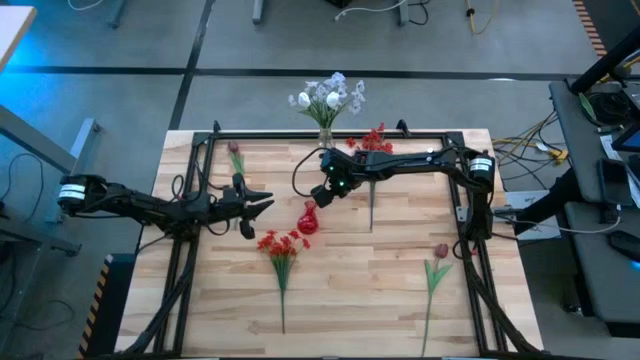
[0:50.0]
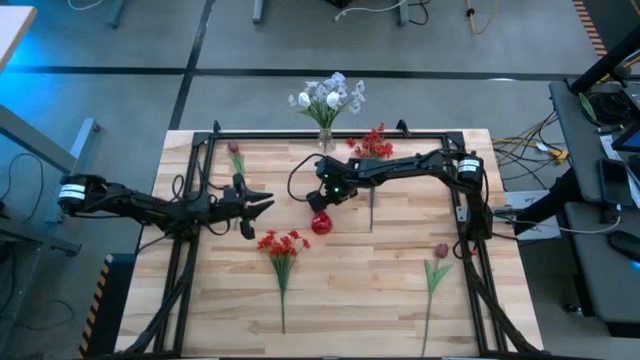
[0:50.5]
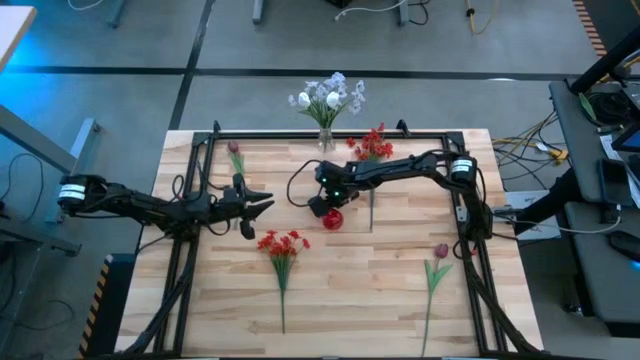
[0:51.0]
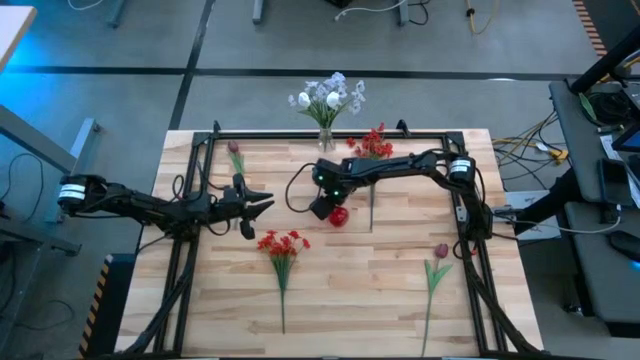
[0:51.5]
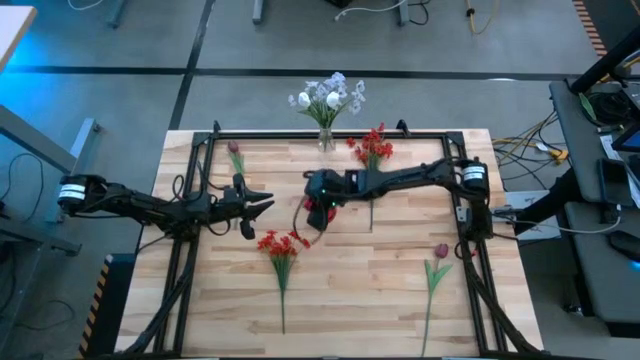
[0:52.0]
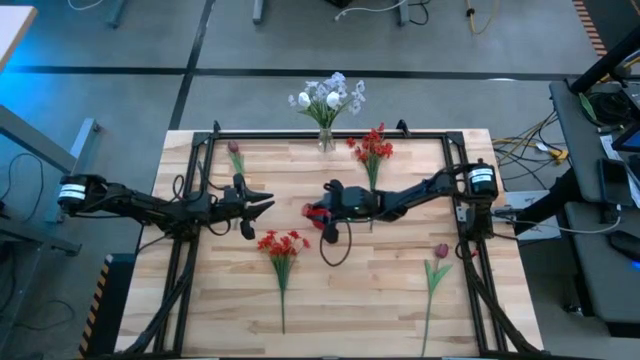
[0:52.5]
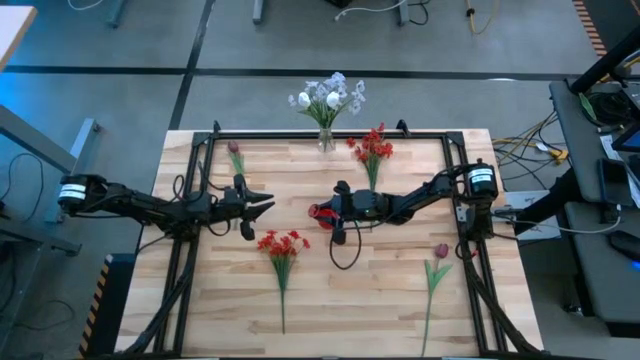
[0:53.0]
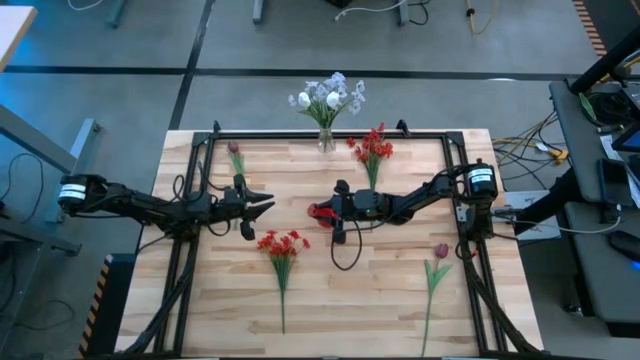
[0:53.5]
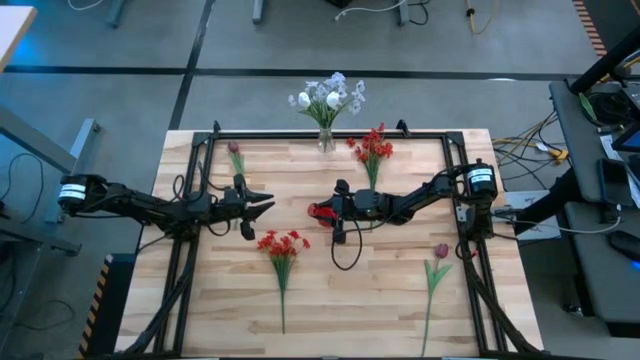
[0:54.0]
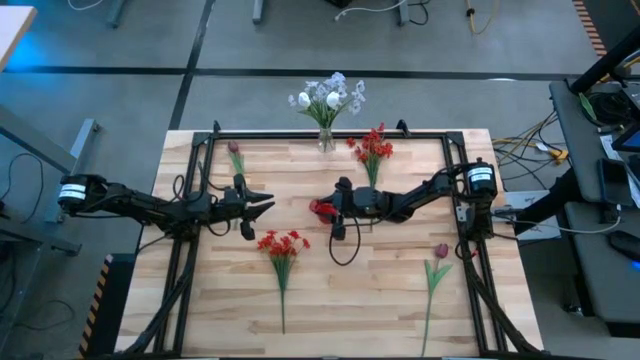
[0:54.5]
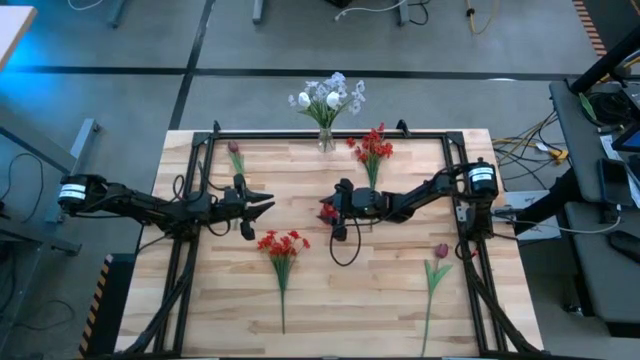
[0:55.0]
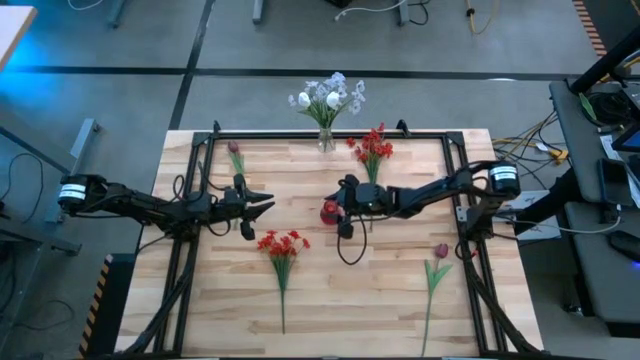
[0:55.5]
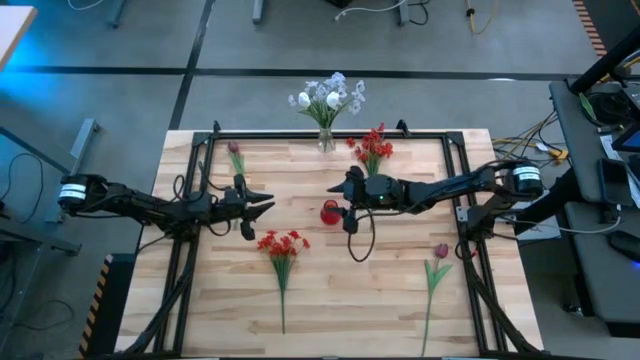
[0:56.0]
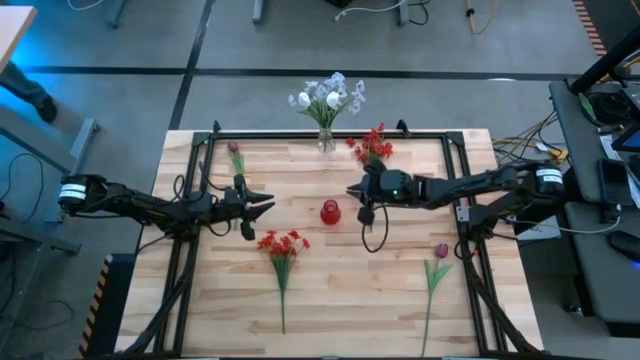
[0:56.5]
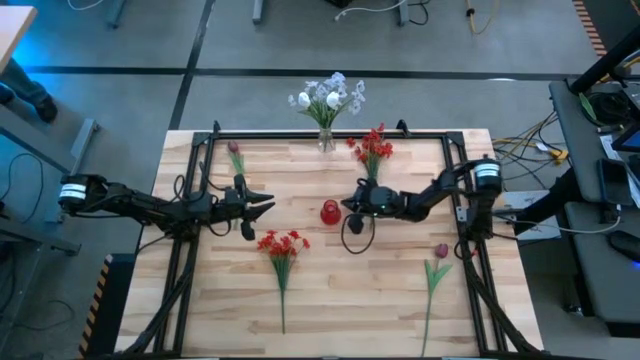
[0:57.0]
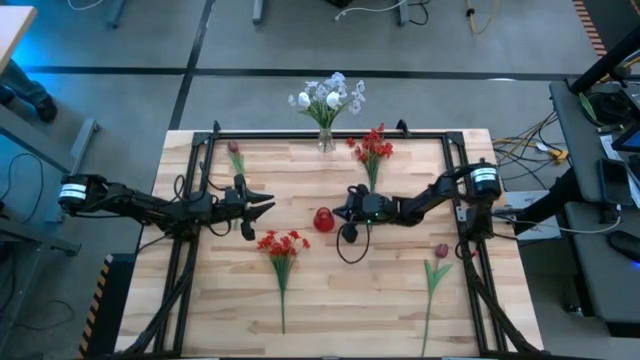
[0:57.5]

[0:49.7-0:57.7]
Task: Sort flowers into vase by color
Adjust the red flower vase

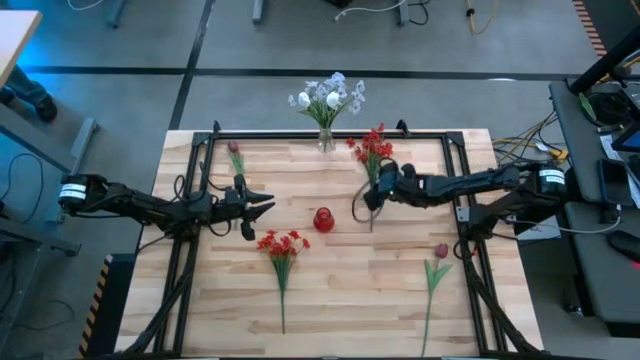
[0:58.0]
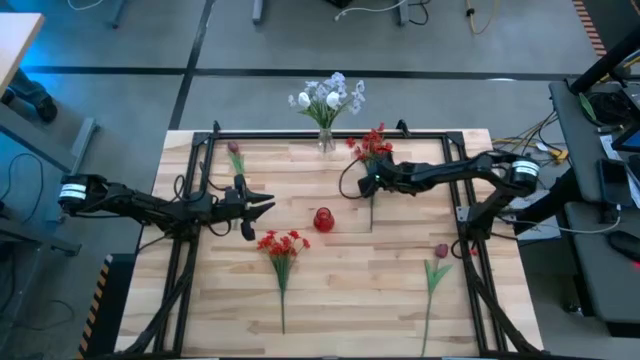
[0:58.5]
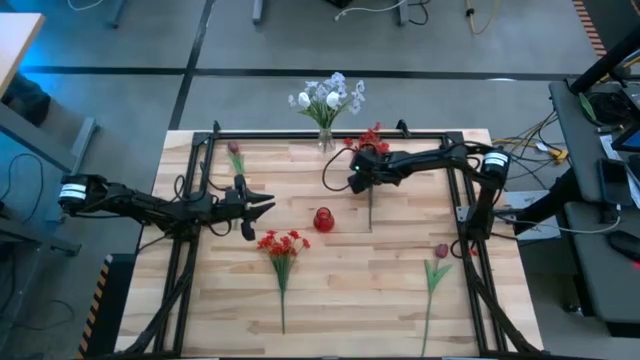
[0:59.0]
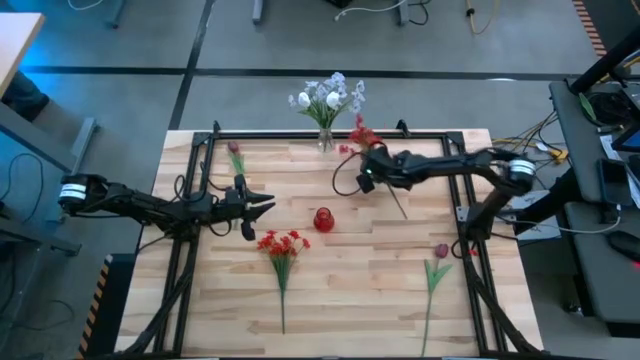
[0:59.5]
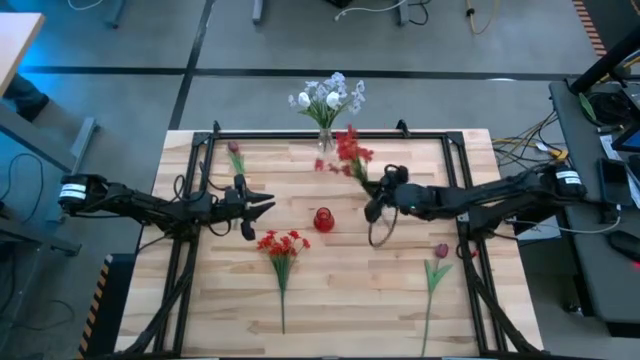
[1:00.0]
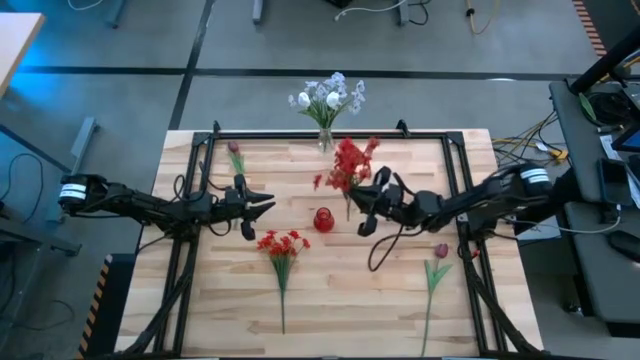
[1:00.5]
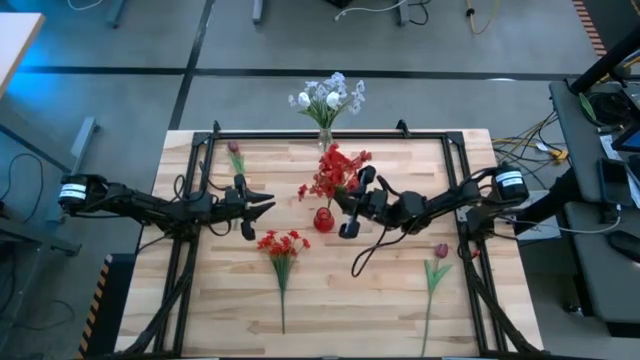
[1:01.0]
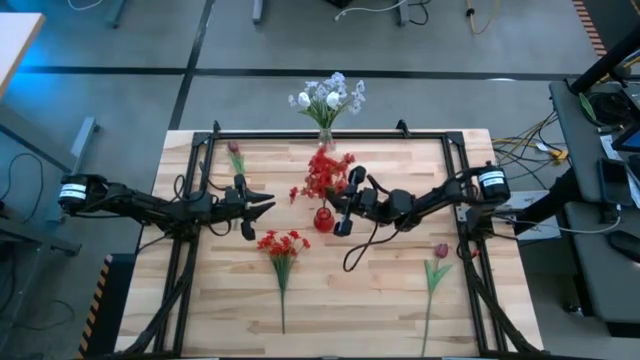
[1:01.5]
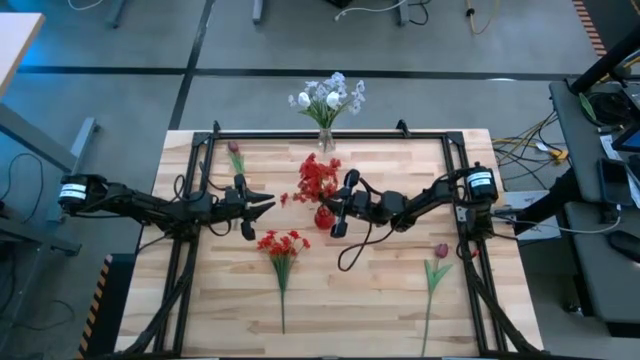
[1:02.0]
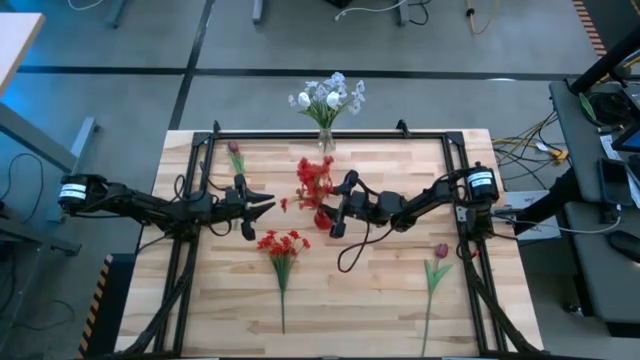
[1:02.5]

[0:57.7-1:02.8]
Put the top red flowers into the red vase

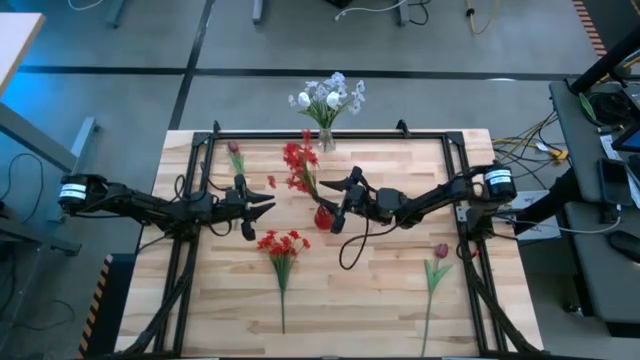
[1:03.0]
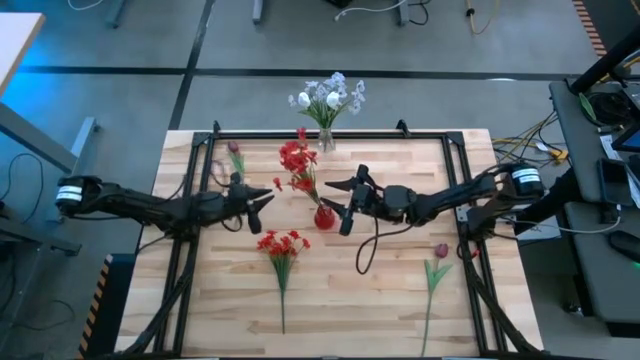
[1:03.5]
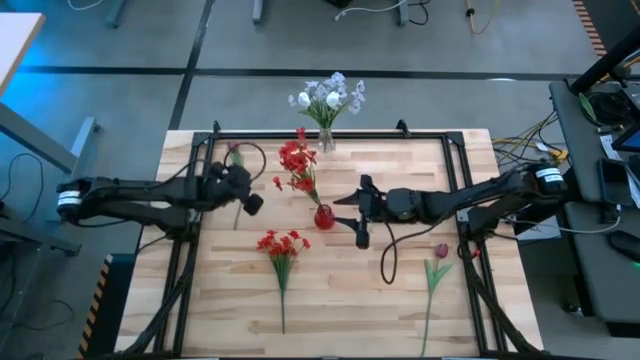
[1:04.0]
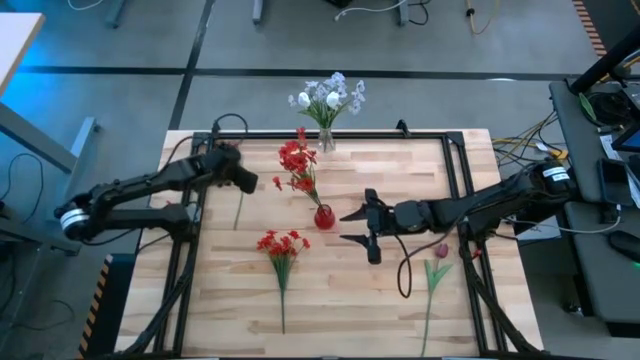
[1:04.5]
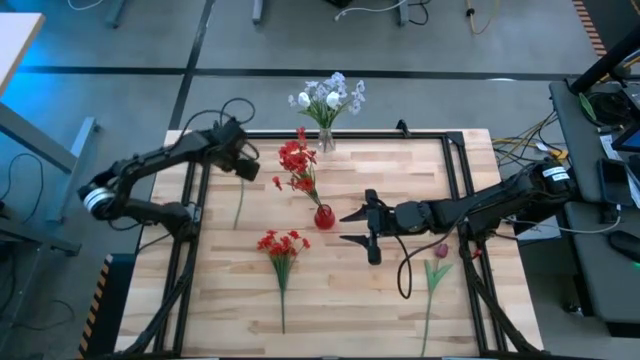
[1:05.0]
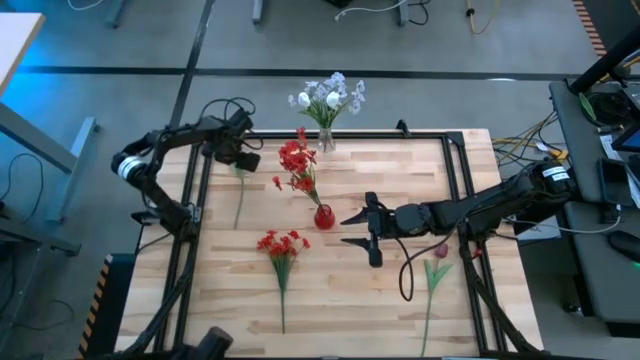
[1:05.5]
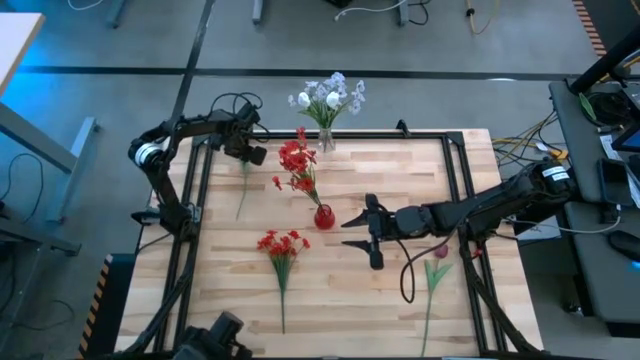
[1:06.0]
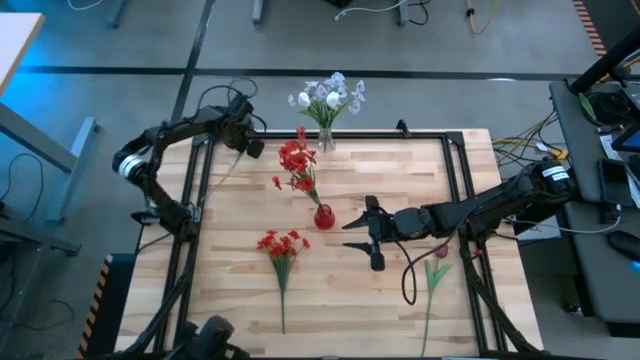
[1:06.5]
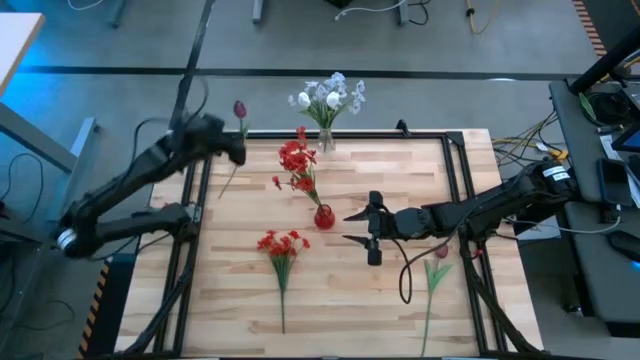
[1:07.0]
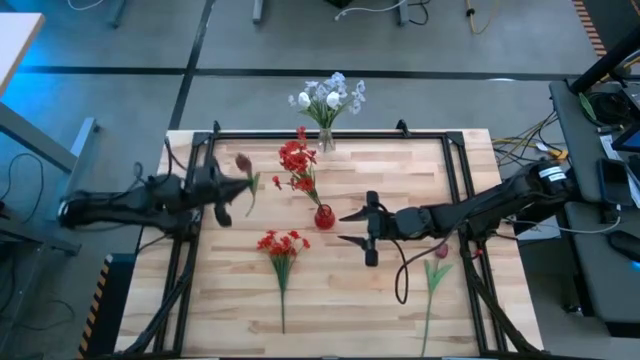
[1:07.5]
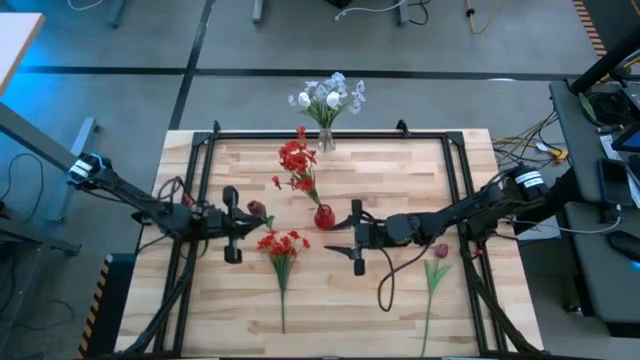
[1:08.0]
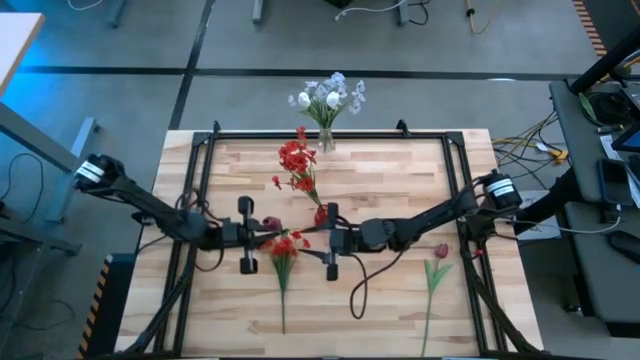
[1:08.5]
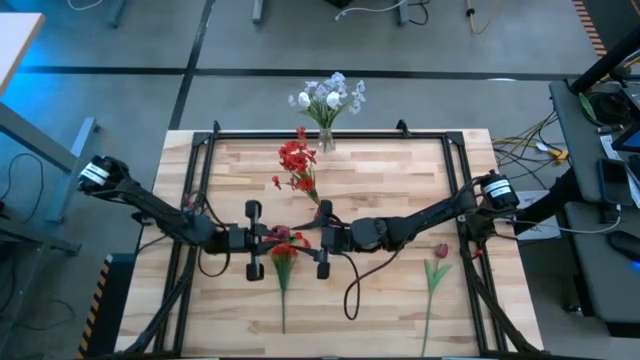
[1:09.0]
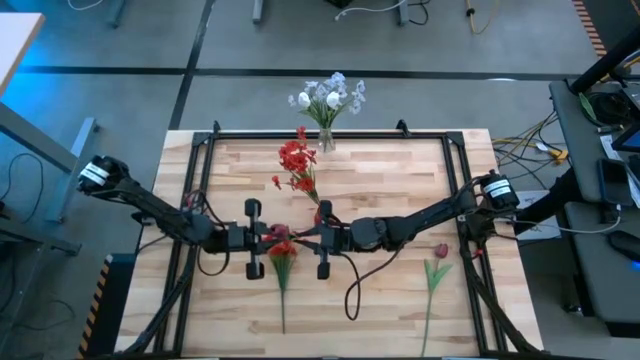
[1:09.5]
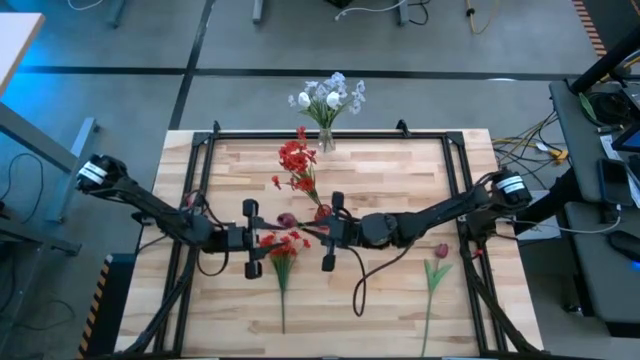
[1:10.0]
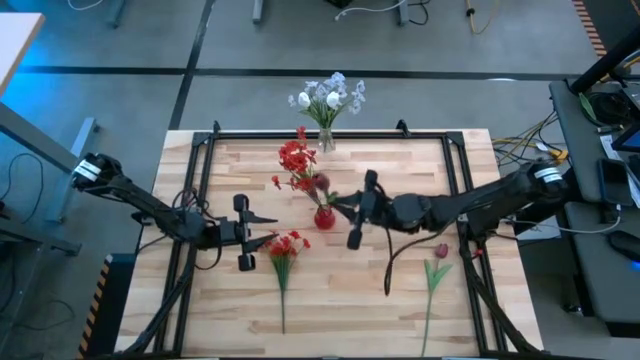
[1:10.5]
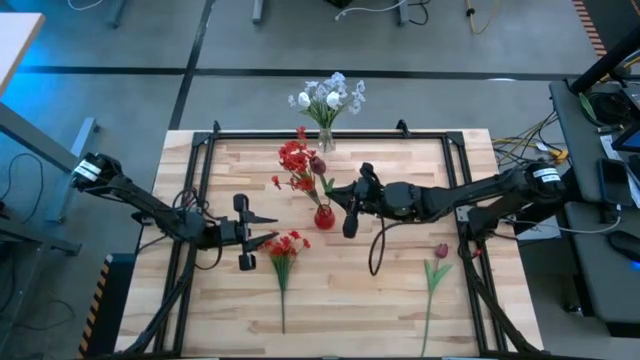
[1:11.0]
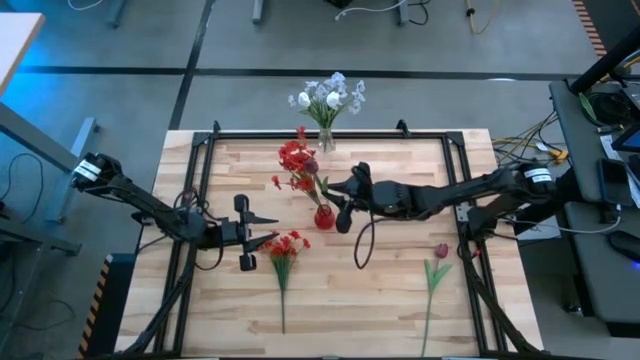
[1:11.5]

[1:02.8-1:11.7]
Put the top dark red flower into the red vase
